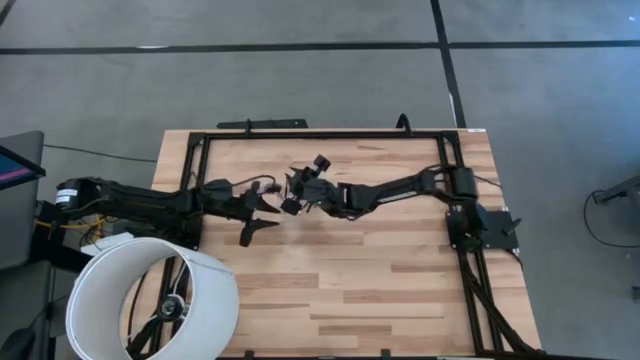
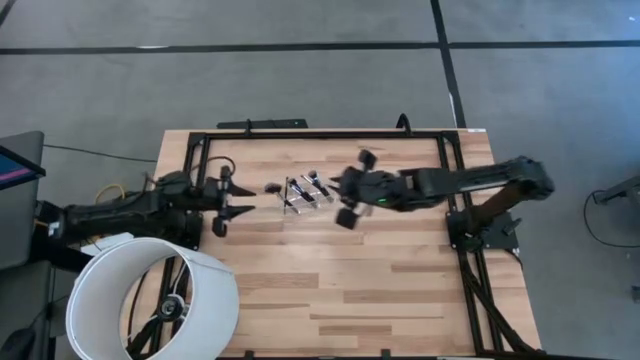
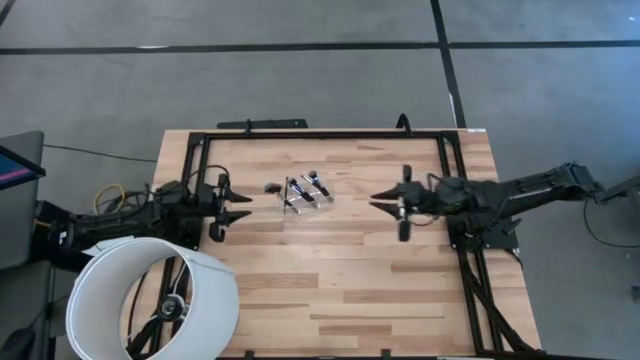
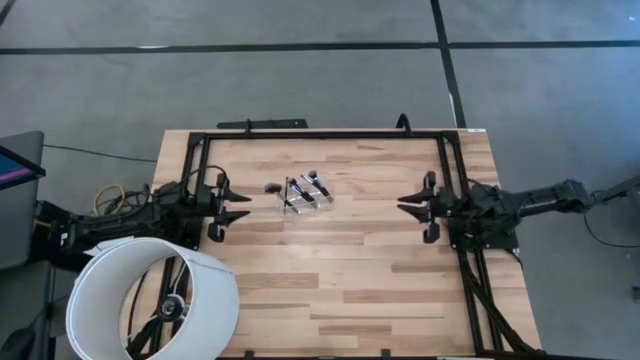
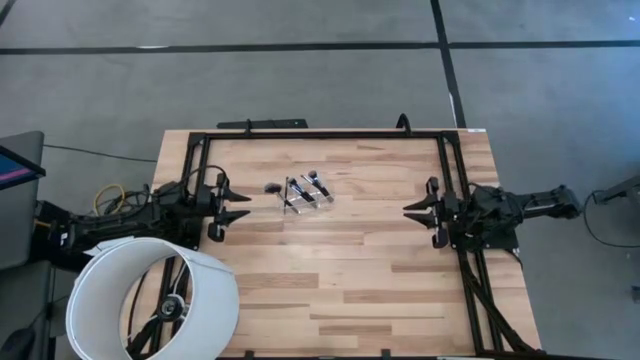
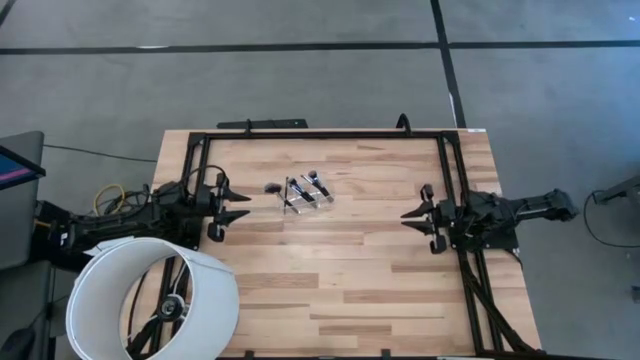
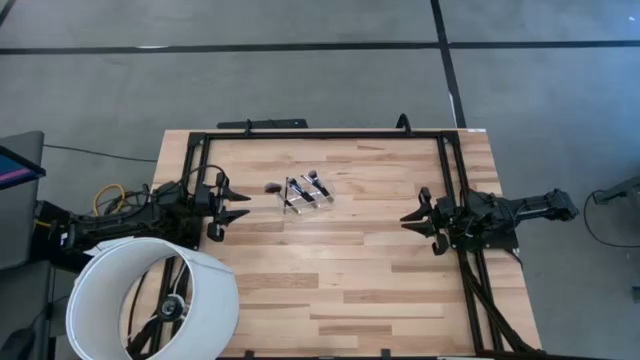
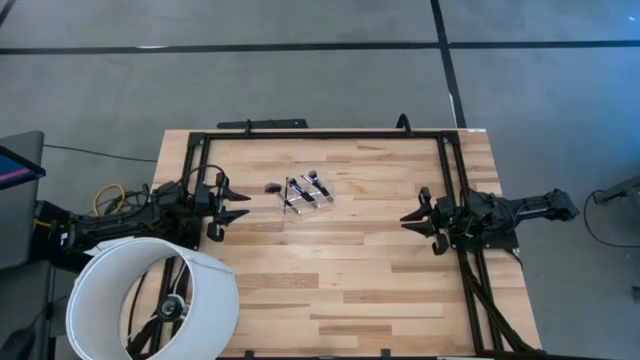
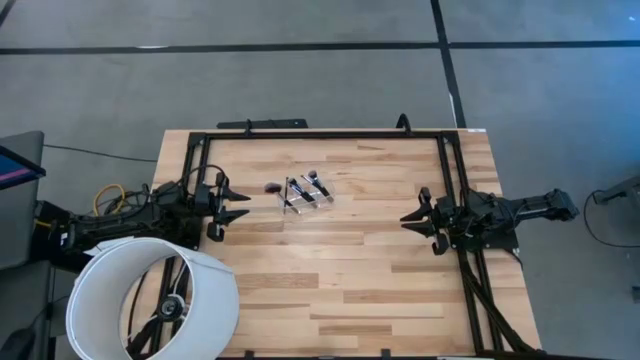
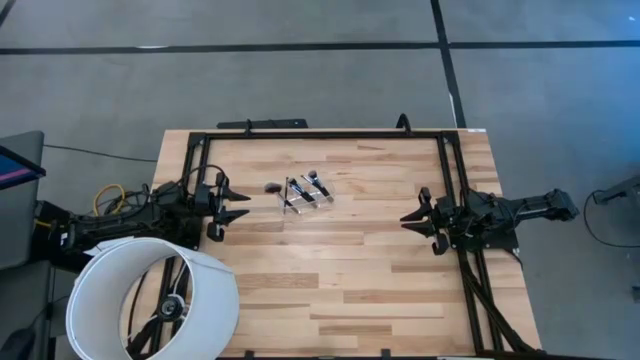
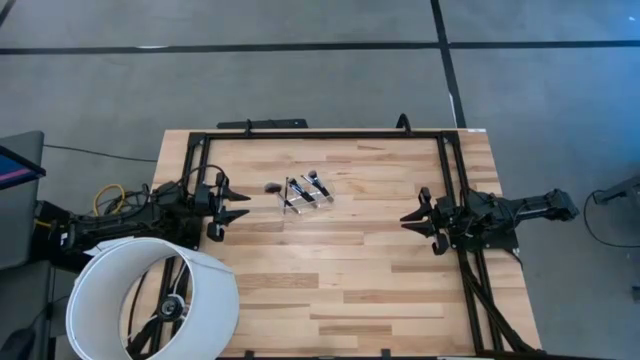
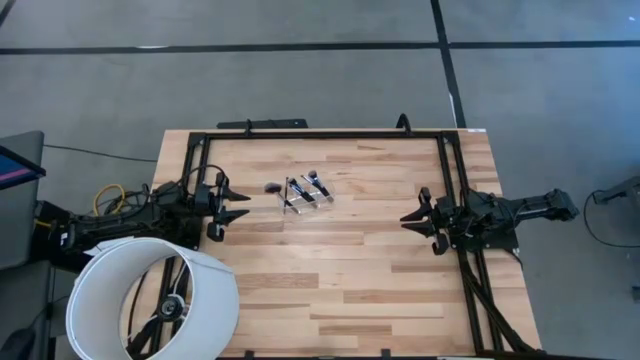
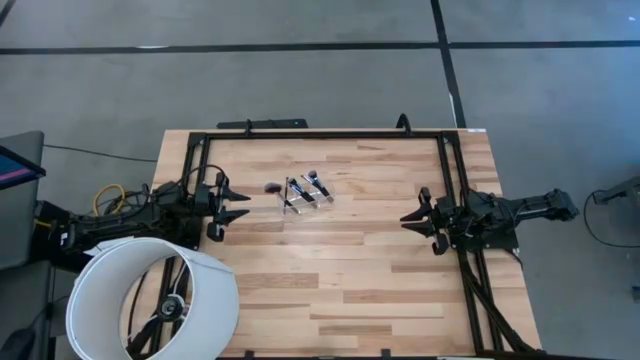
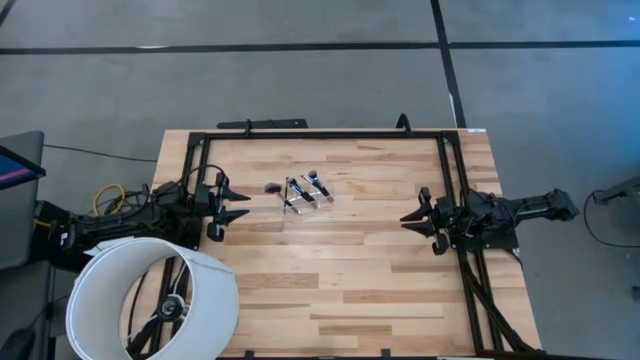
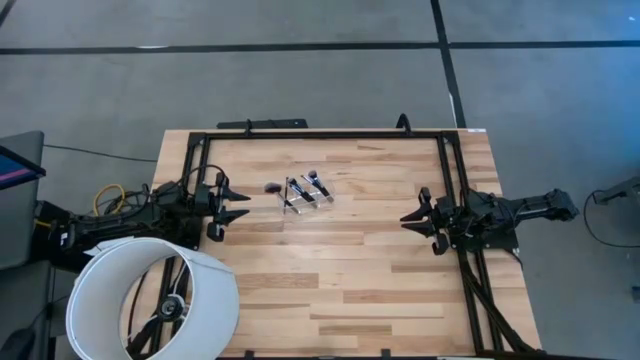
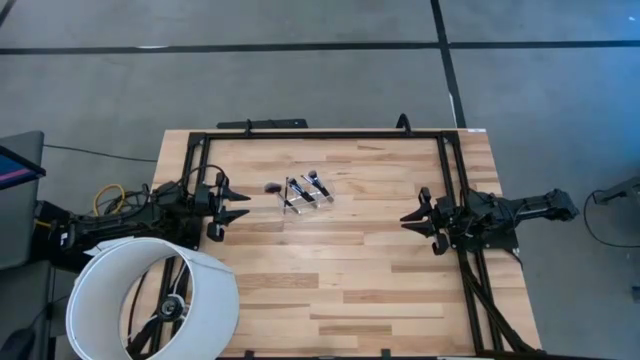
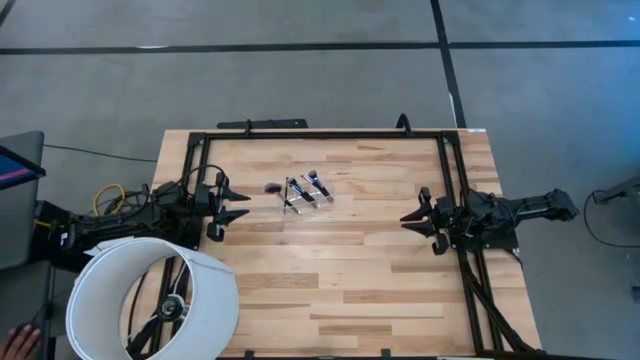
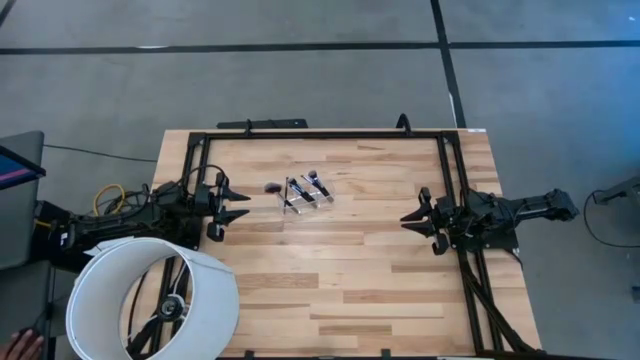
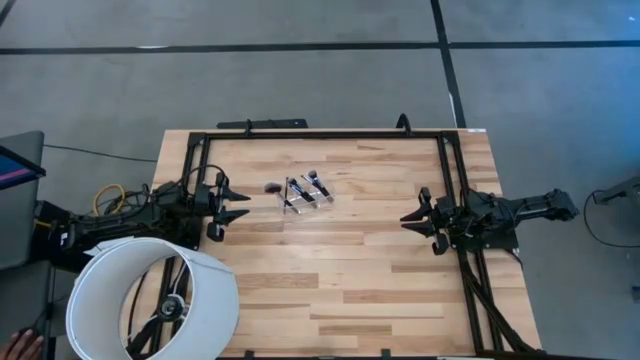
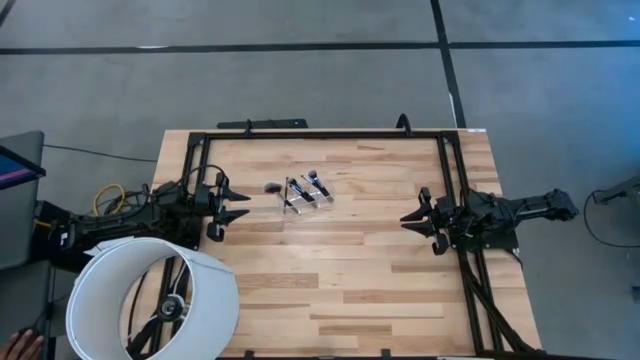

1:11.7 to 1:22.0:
Task: Put items in baskets/containers
Return to Home Position

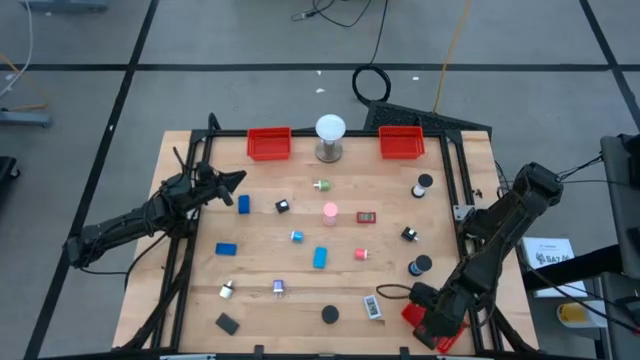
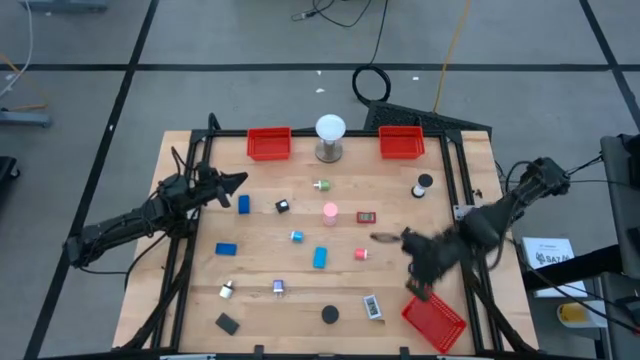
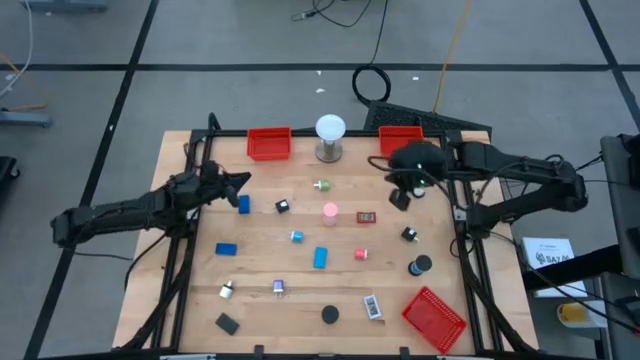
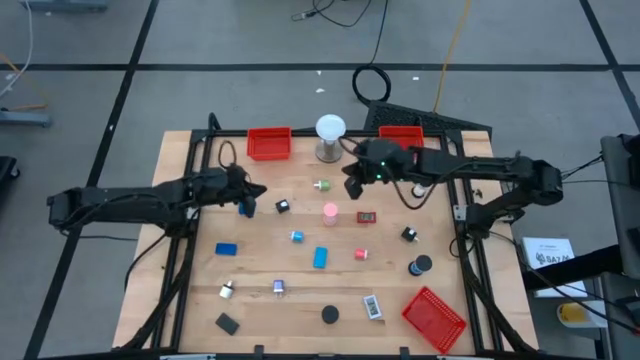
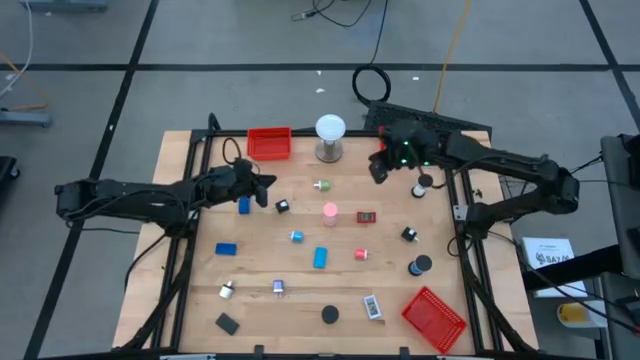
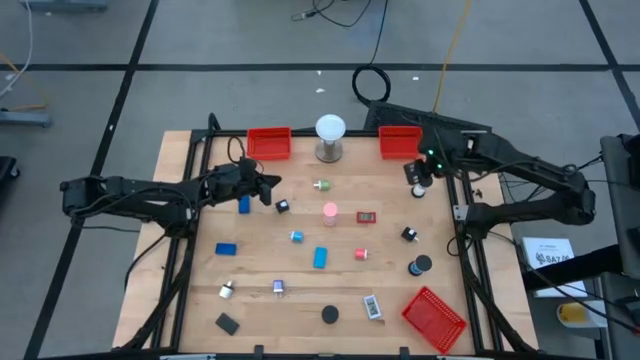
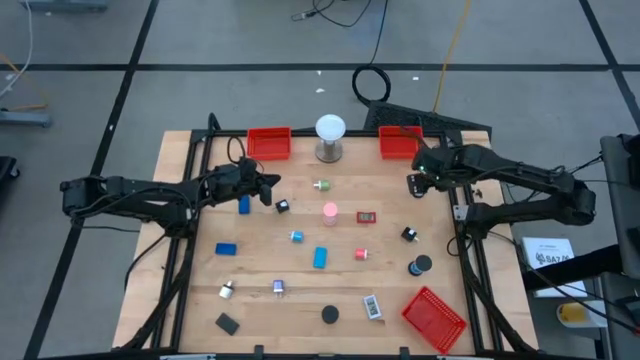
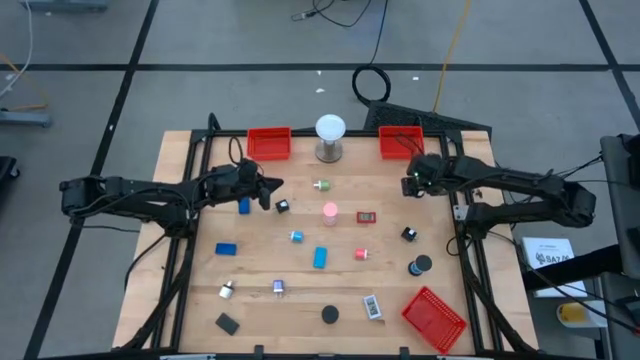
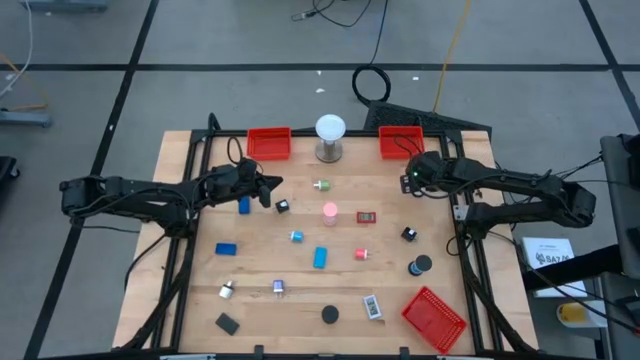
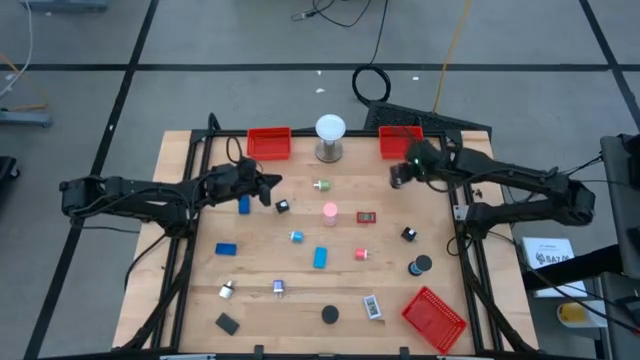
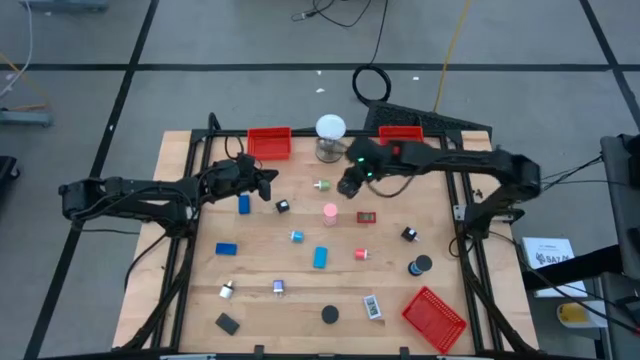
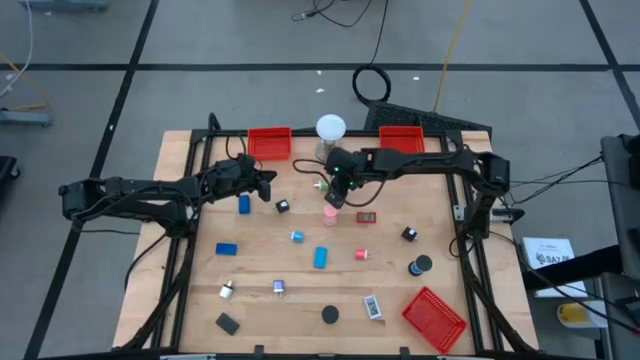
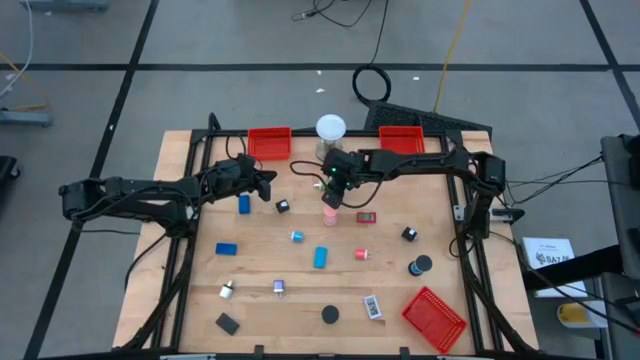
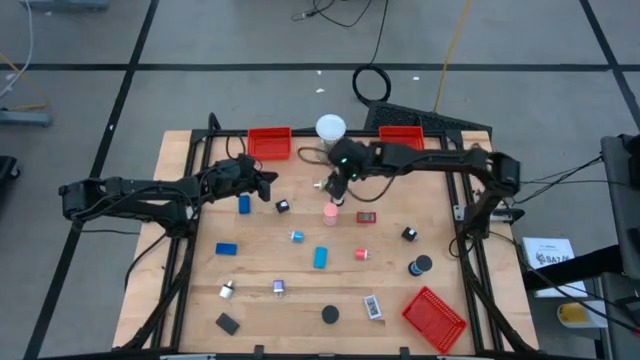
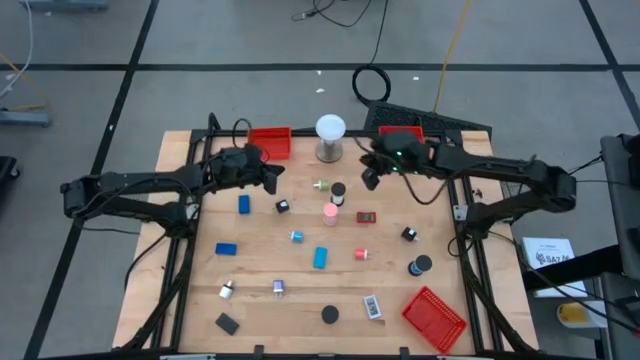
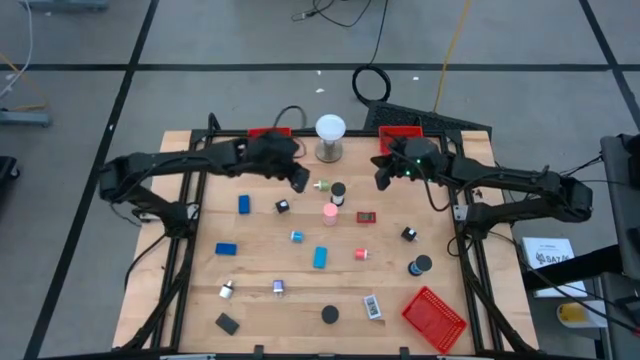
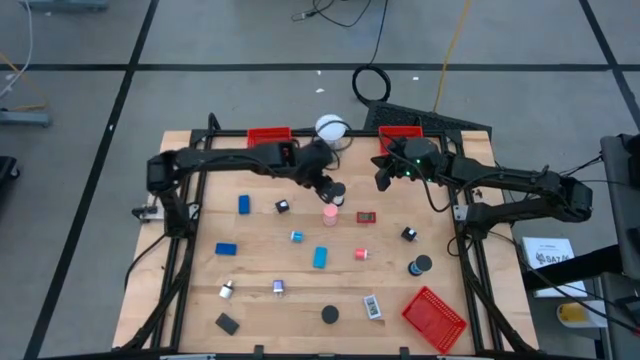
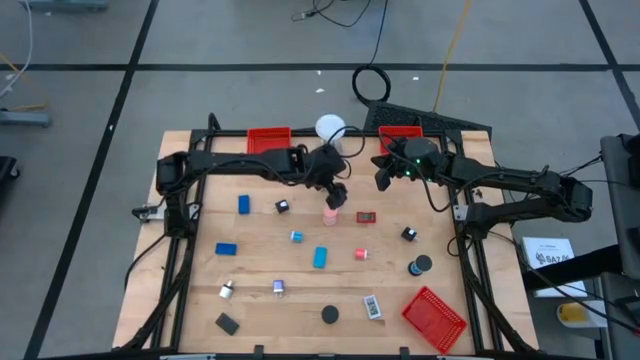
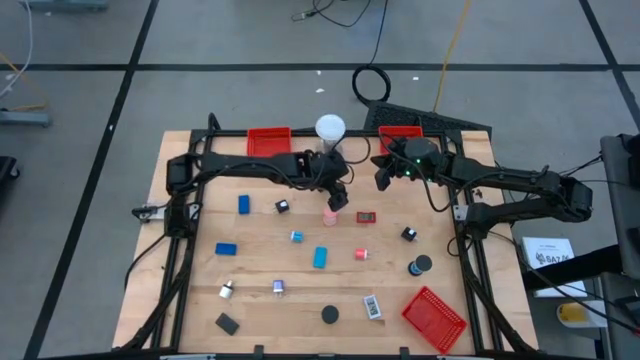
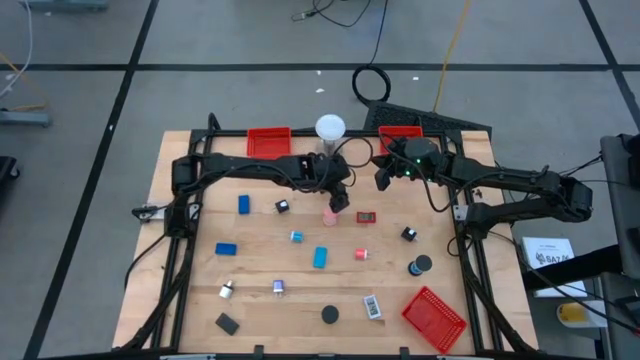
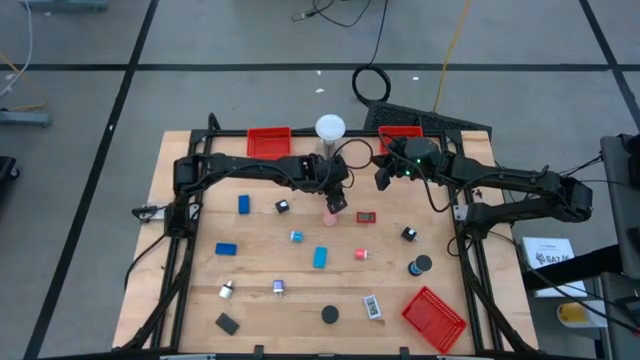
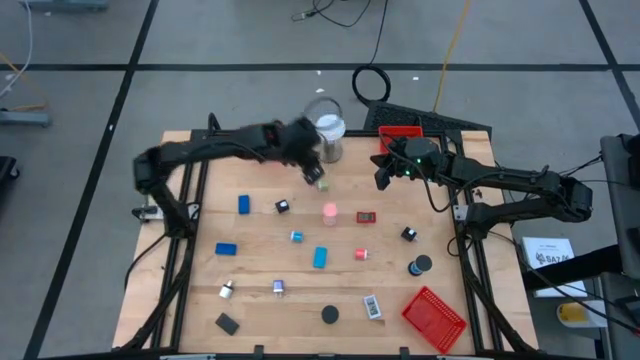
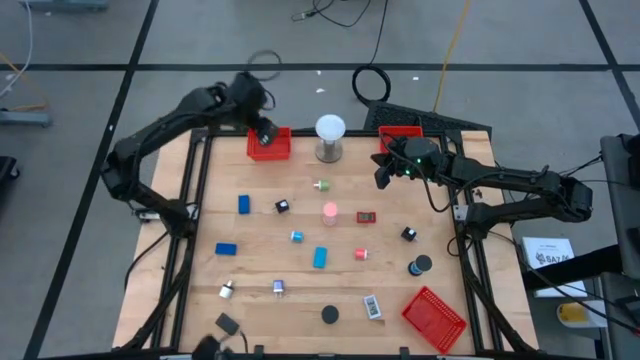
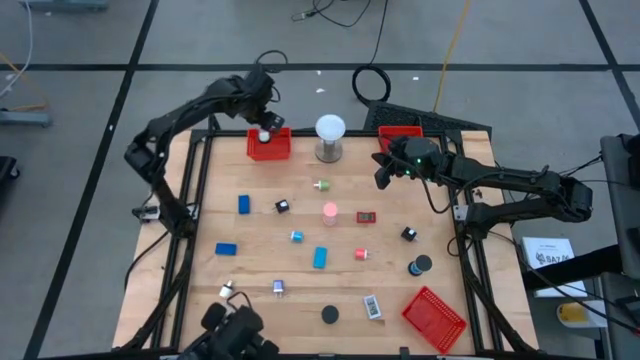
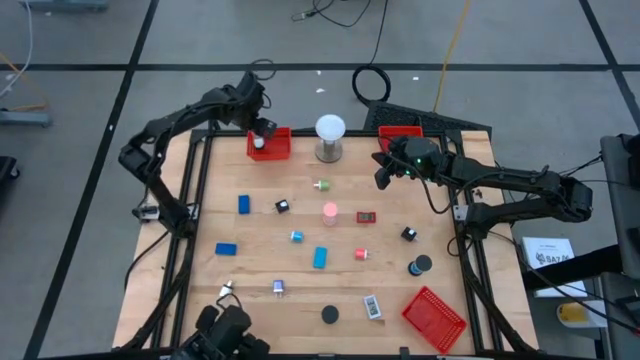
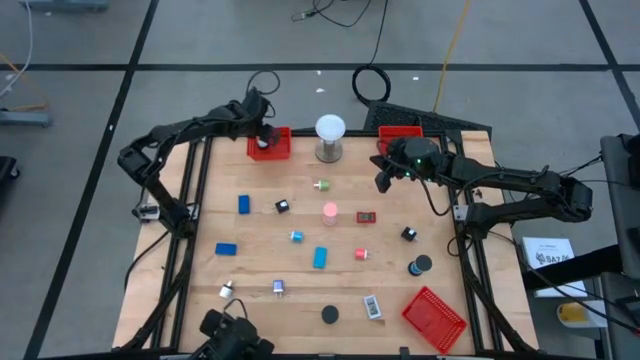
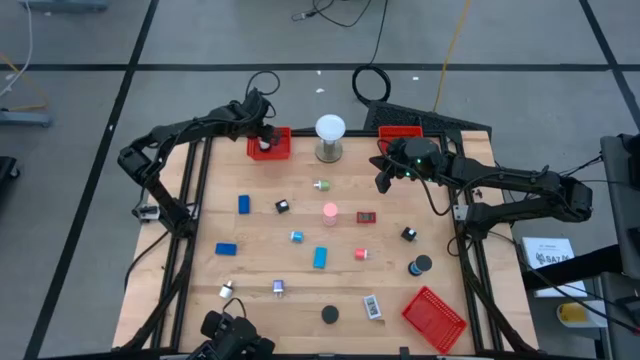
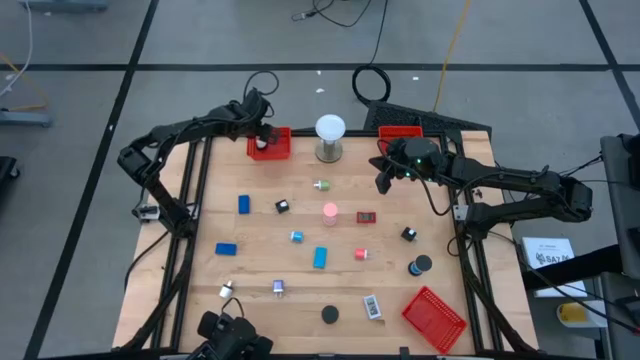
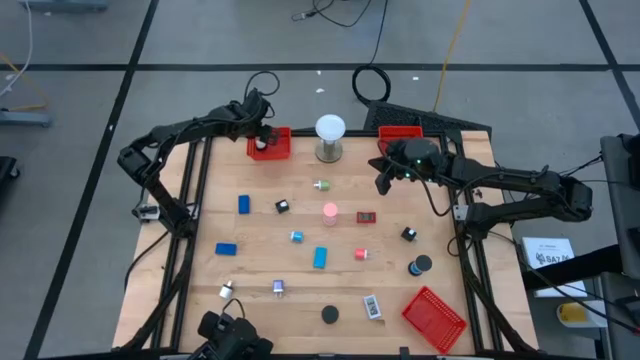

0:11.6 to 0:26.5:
Task: Pick & Place Office items
Put the white hourglass into the top left red bin
